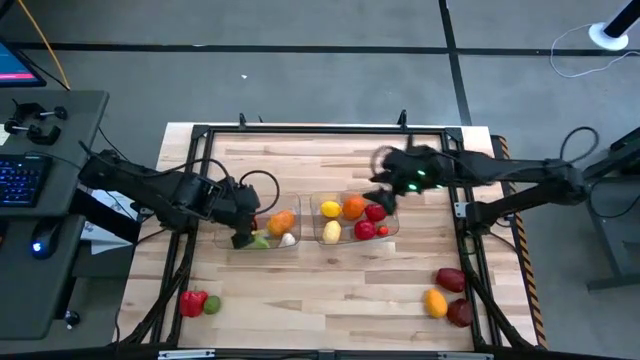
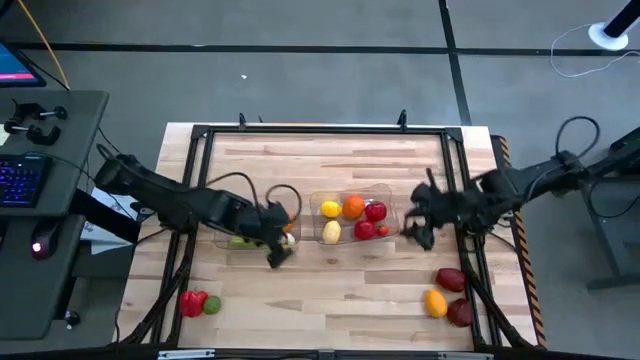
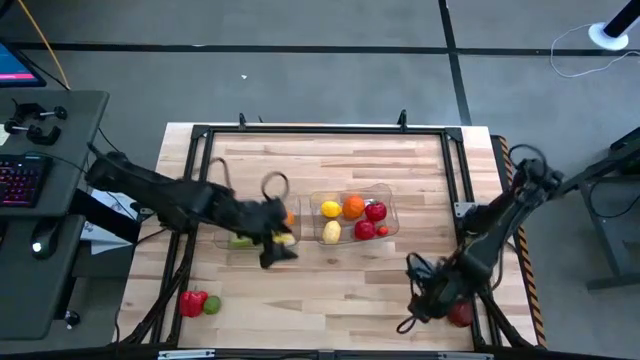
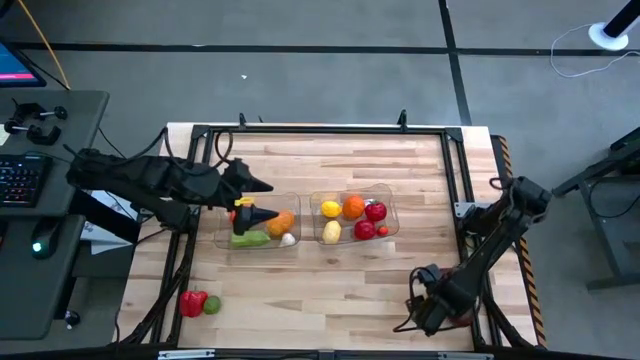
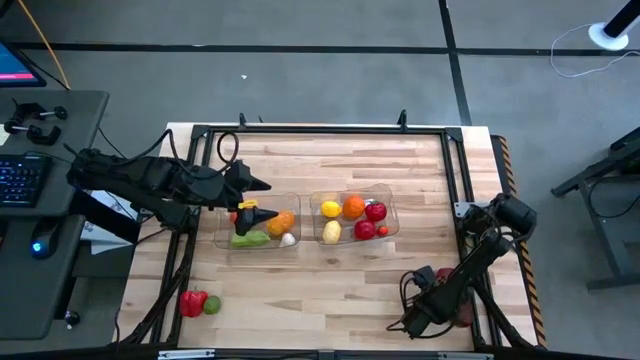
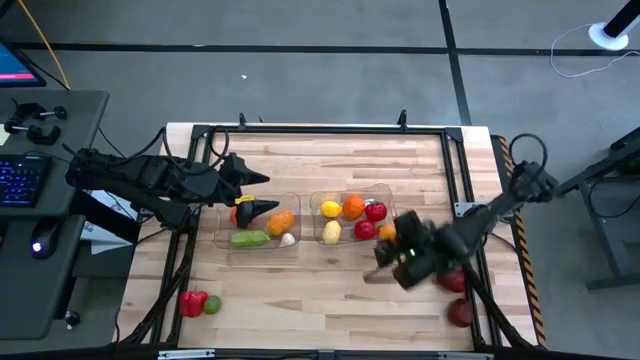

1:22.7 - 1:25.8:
Task: Sort produce into baskets
Put the yellow lemon into the right transparent bin

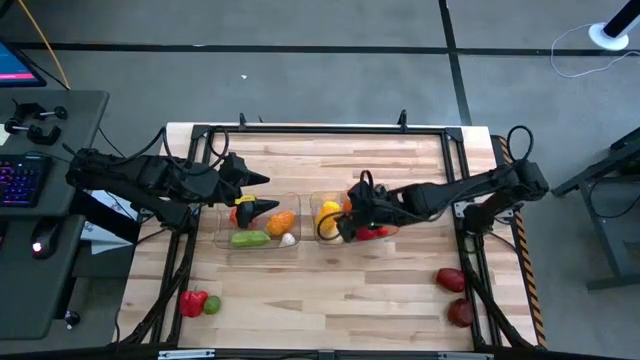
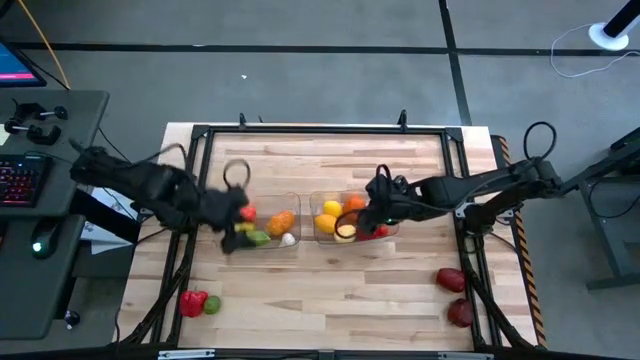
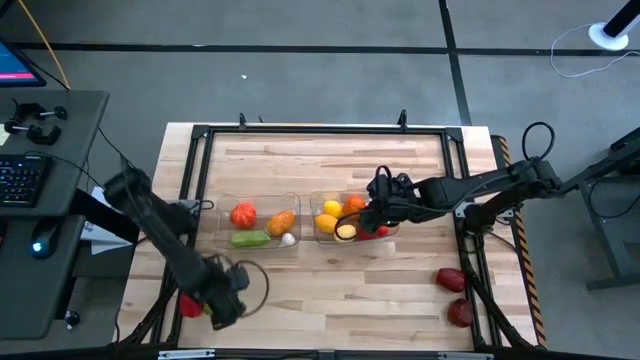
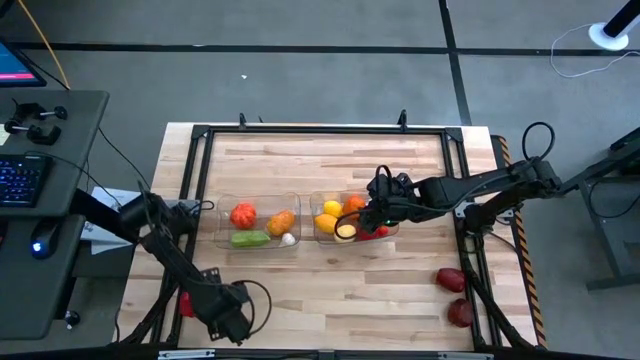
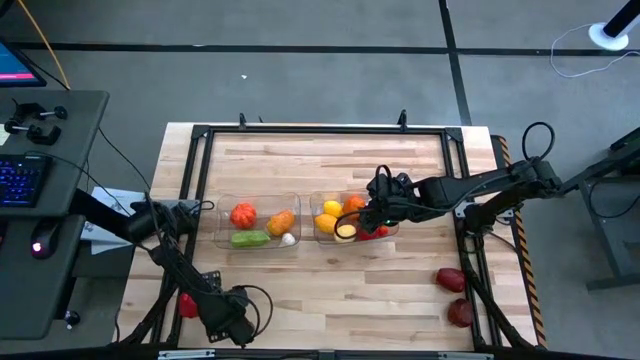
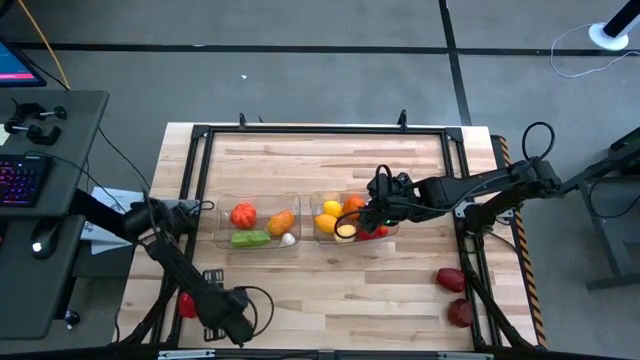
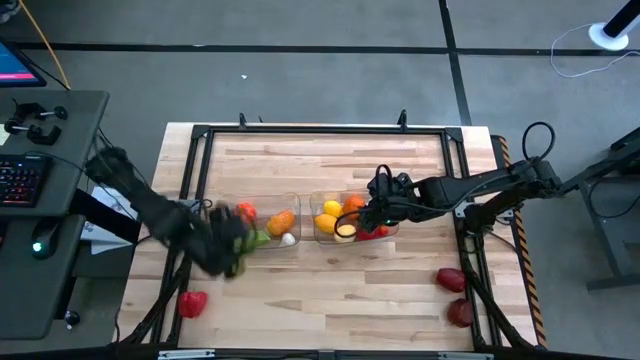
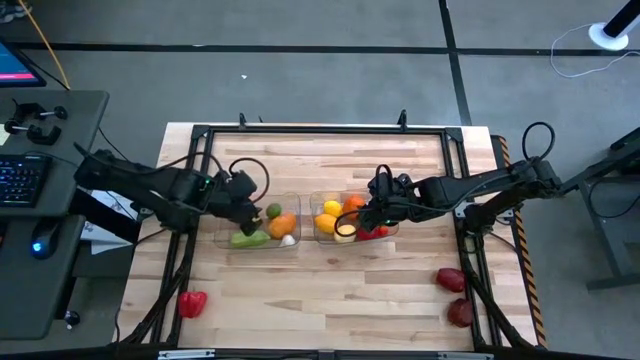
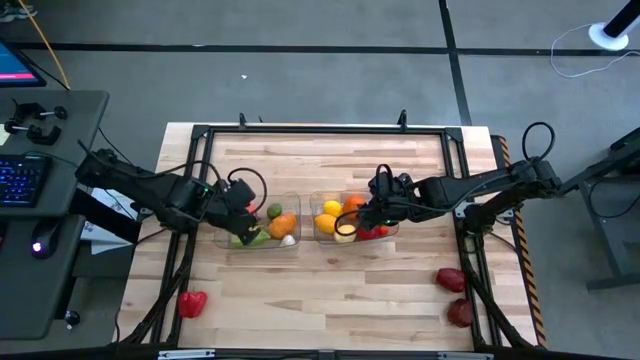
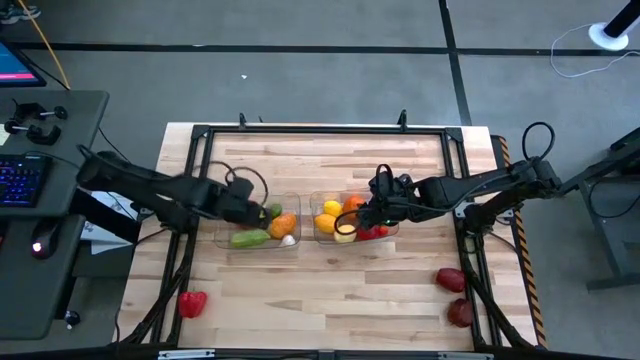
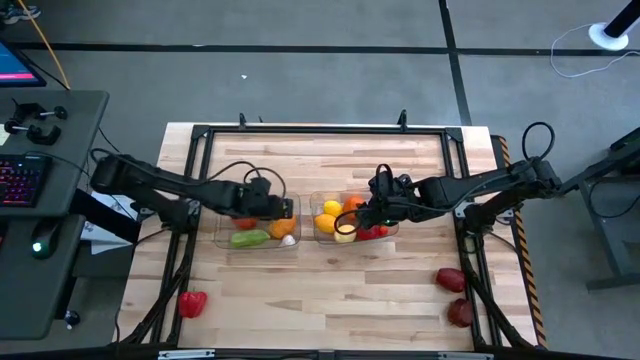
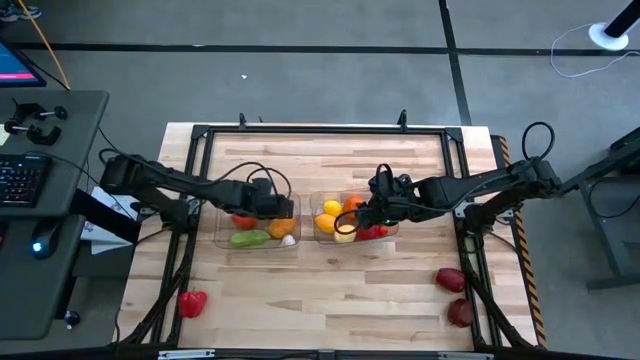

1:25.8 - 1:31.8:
Put the green lime into the left transparent bin

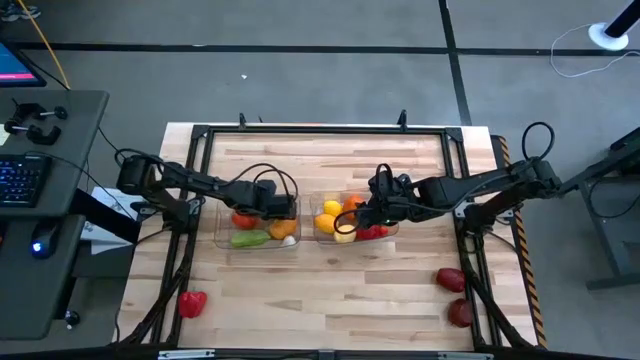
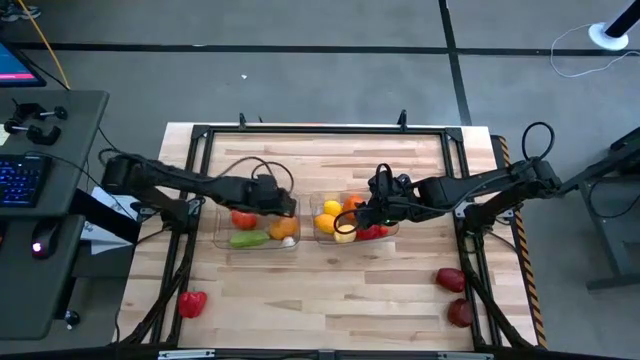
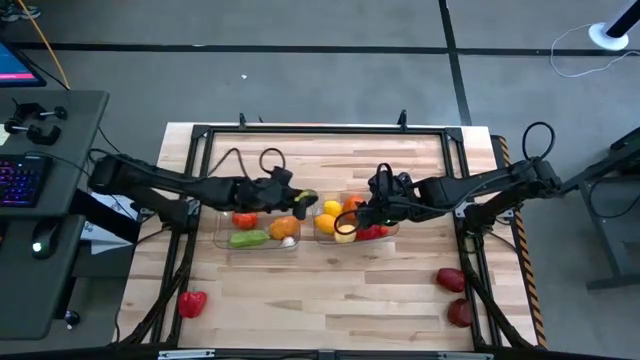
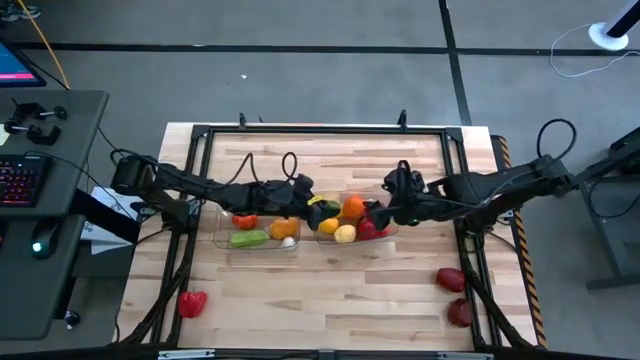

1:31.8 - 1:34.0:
Put the green lime into the right transparent bin

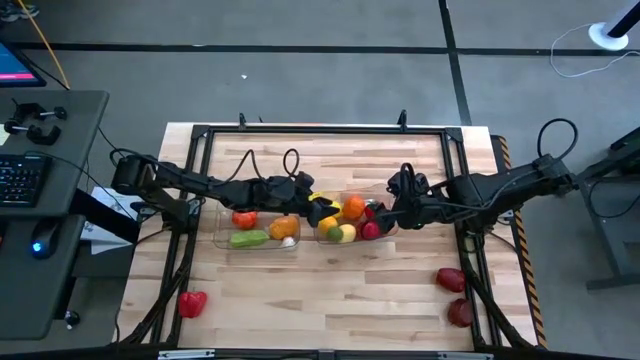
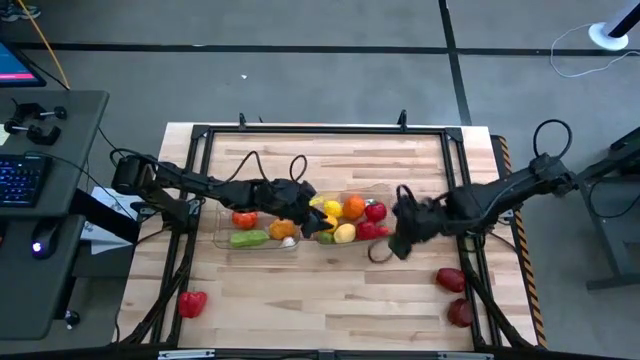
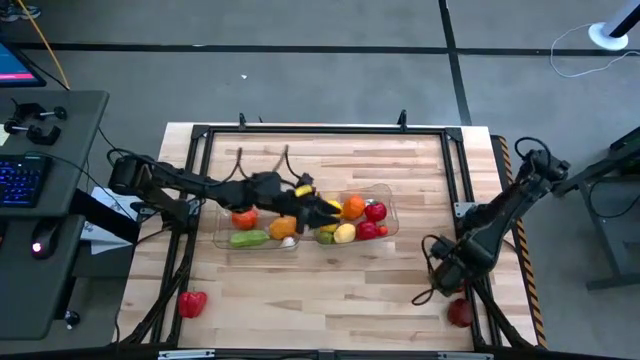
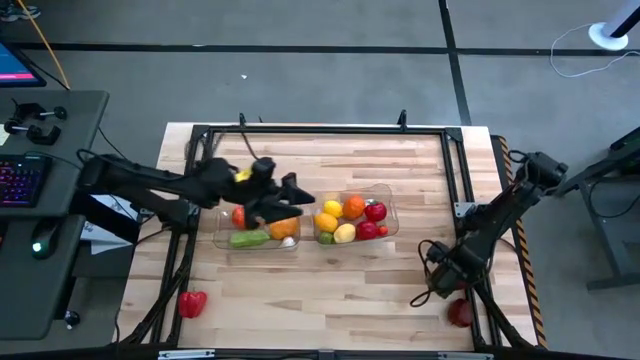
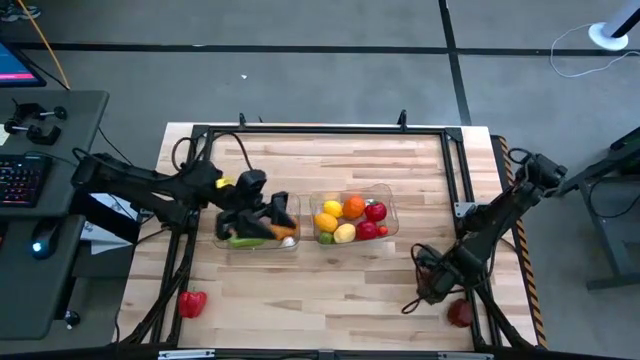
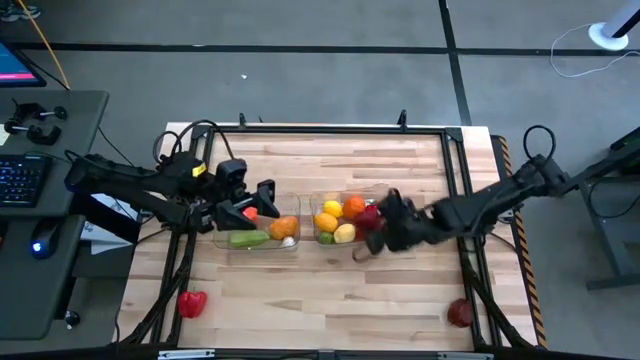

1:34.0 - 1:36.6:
Put the top red apple into the right transparent bin

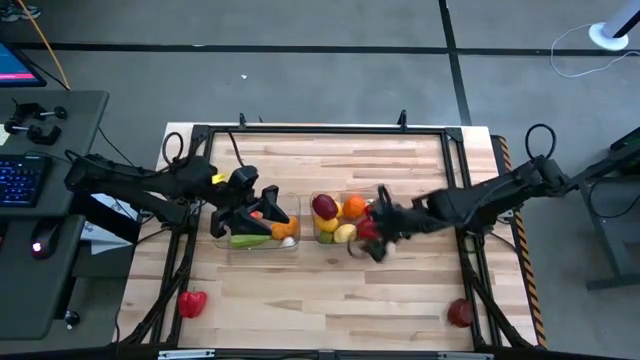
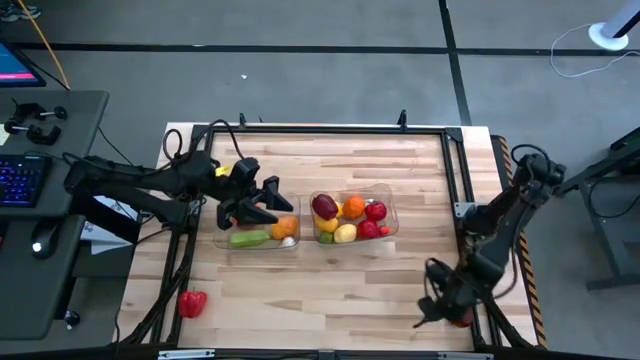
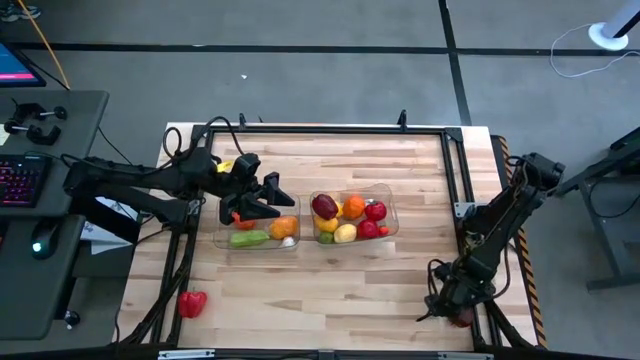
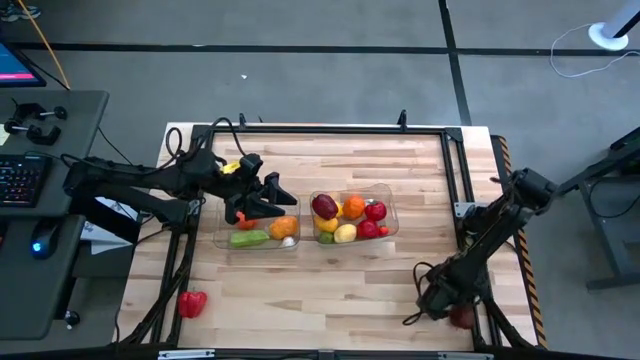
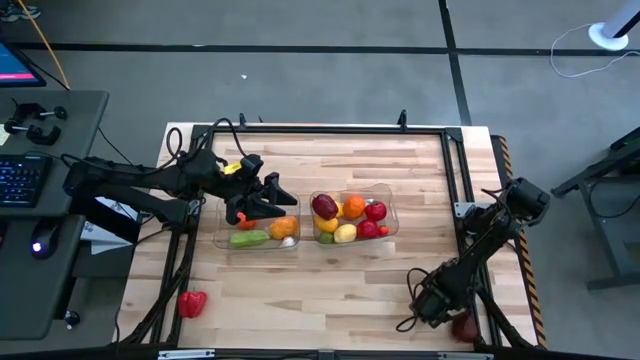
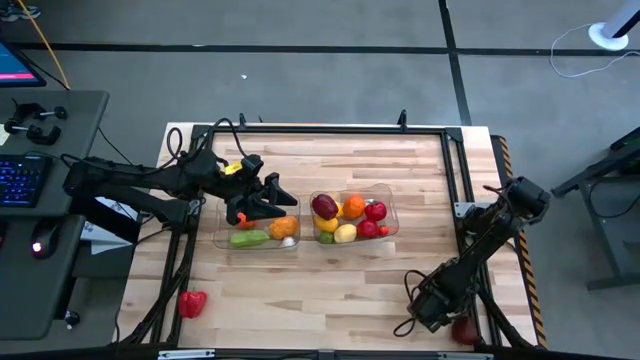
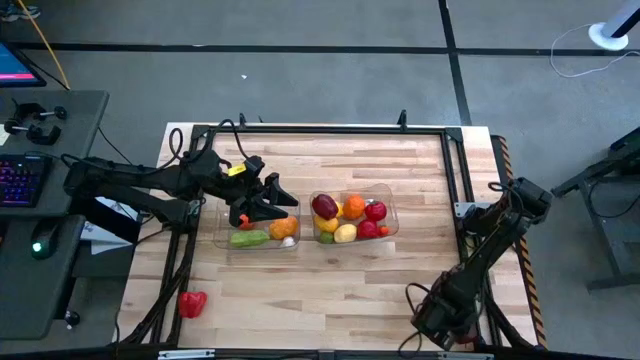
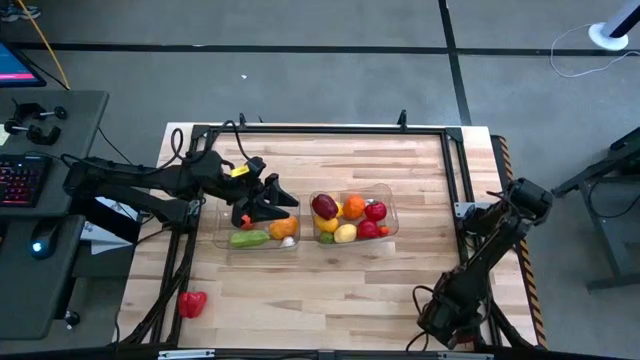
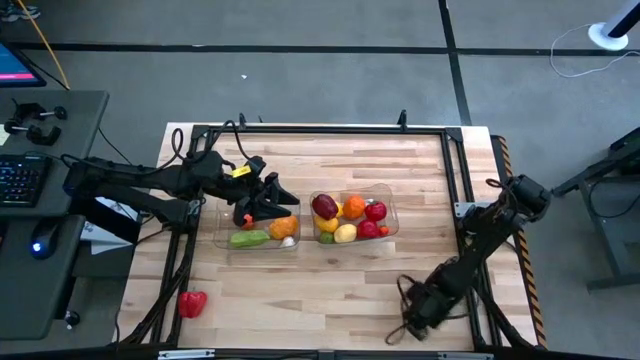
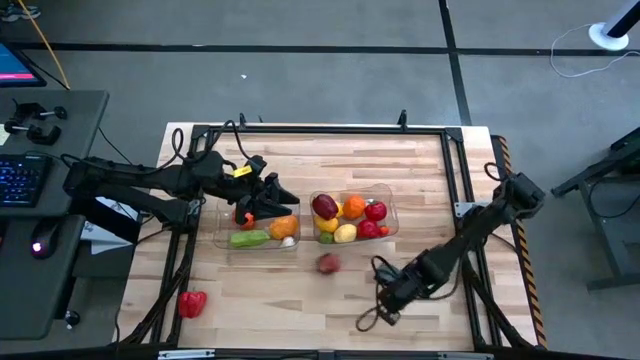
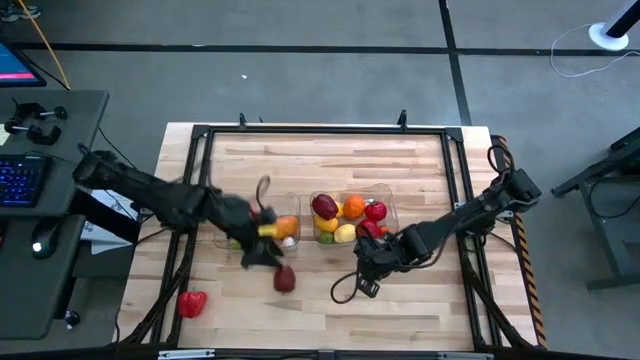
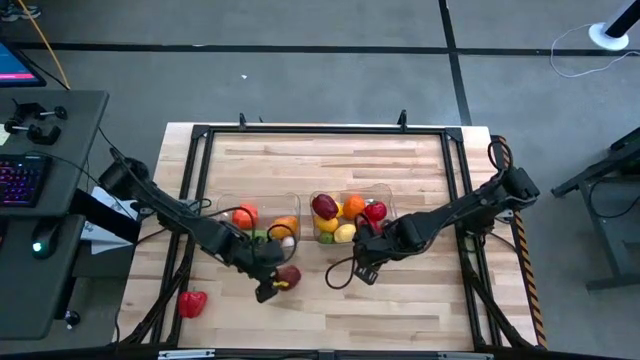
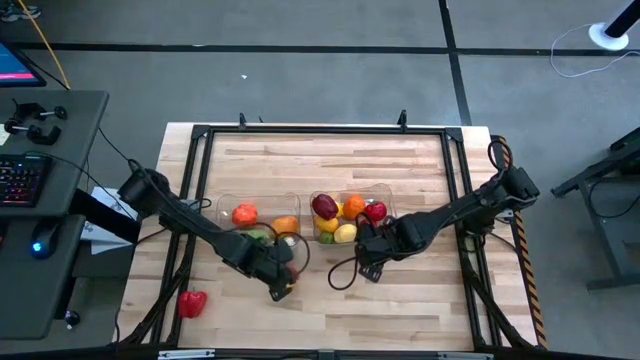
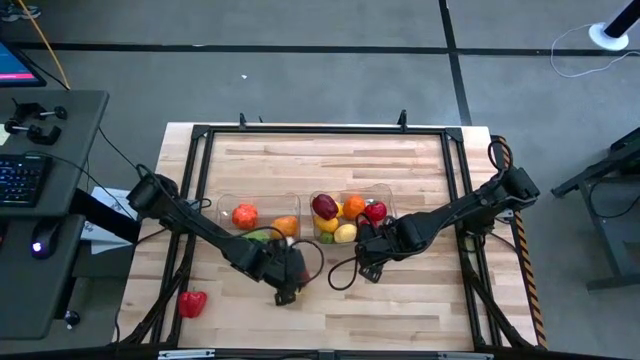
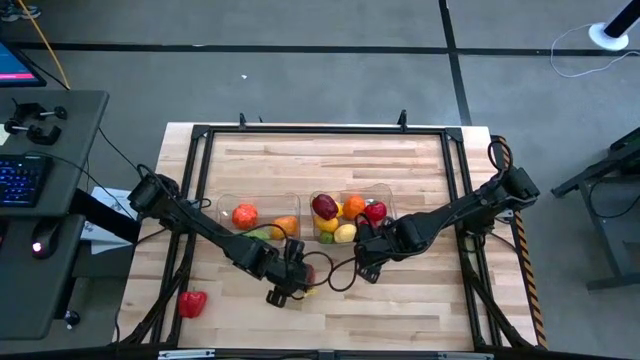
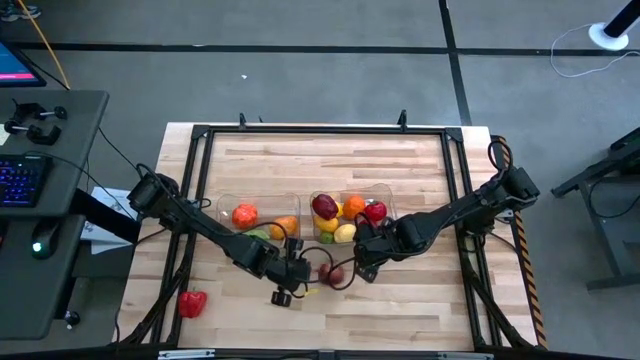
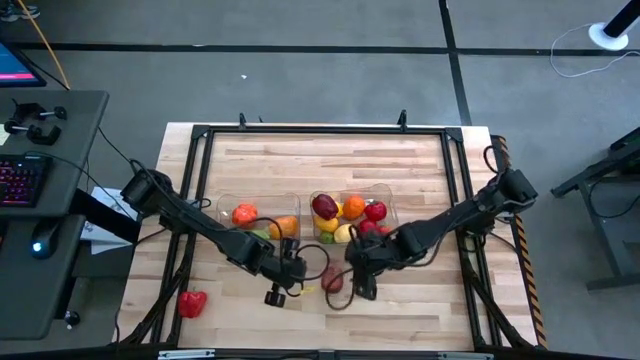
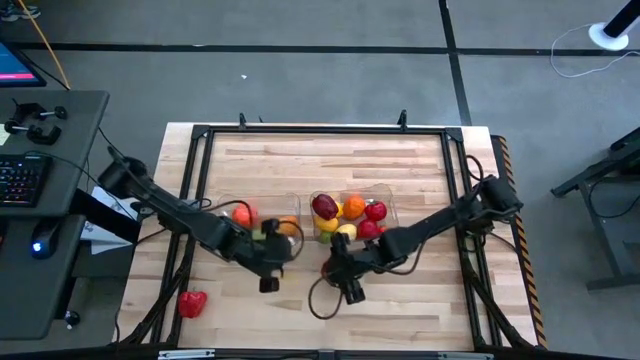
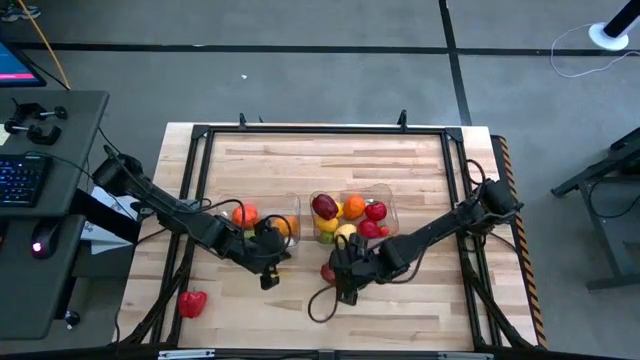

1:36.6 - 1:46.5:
Put the red apple into the right transparent bin
